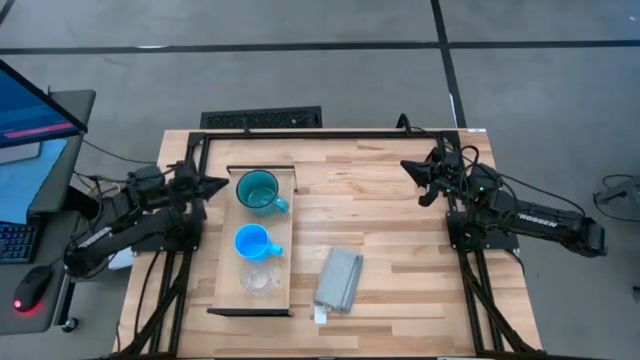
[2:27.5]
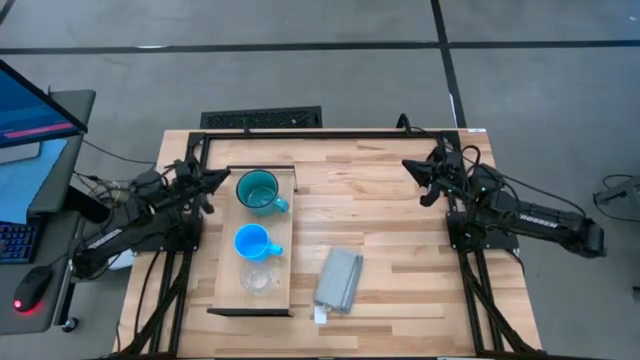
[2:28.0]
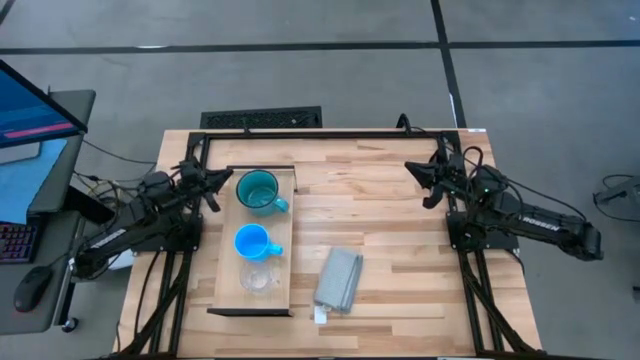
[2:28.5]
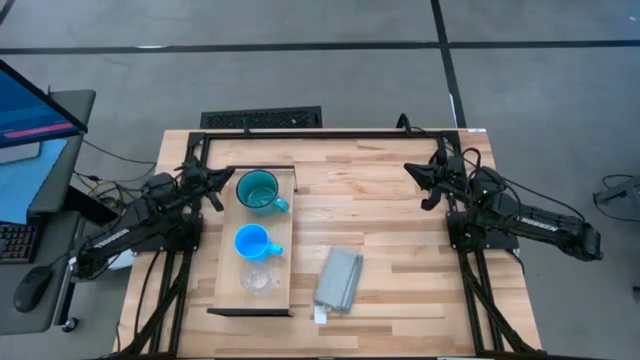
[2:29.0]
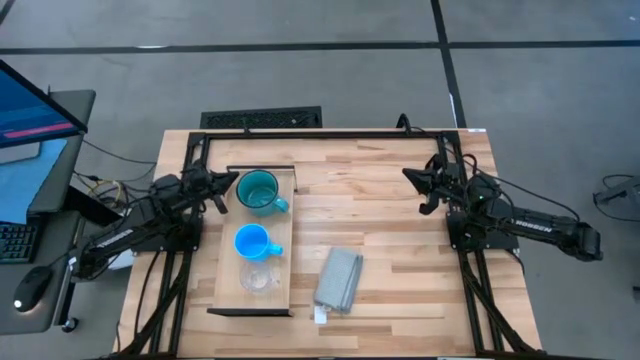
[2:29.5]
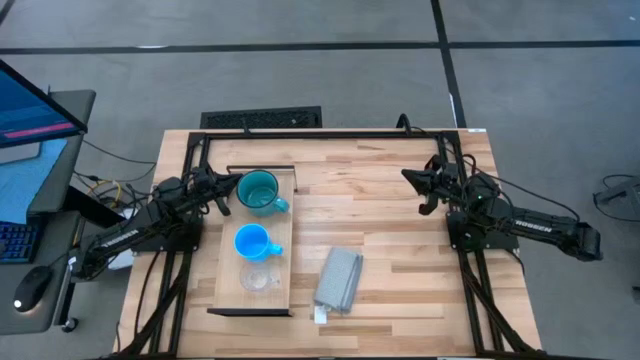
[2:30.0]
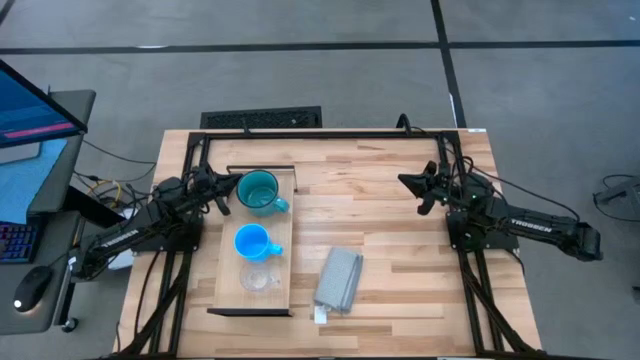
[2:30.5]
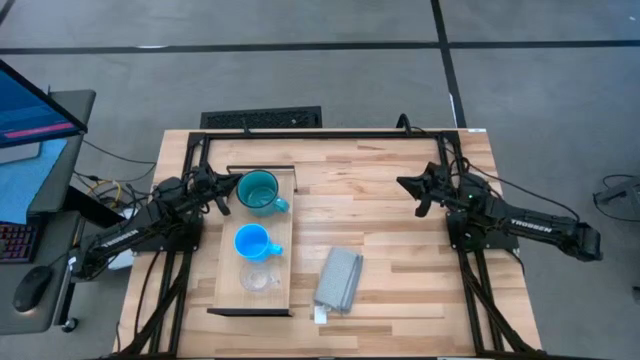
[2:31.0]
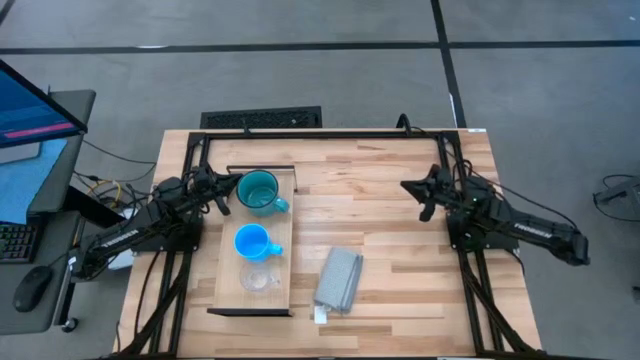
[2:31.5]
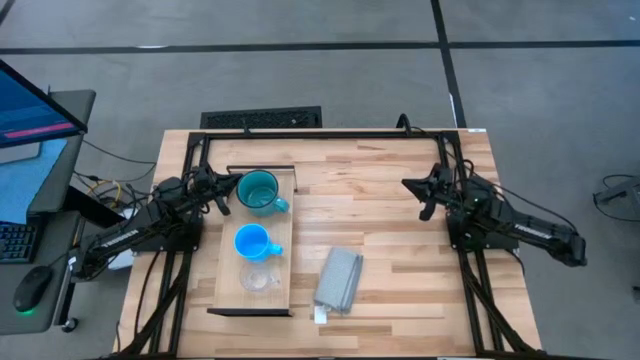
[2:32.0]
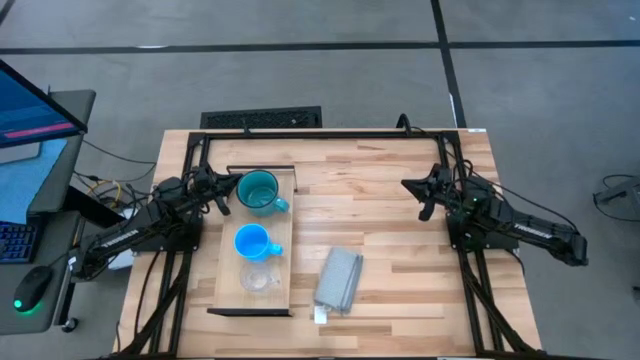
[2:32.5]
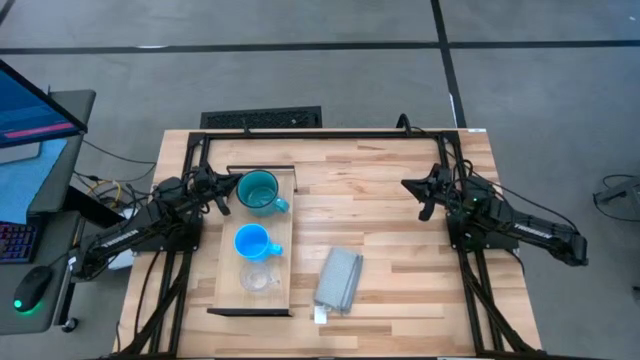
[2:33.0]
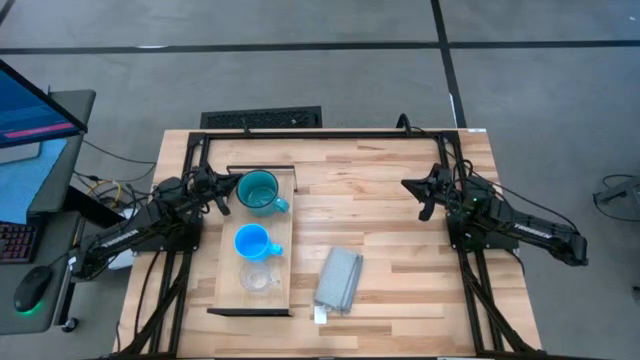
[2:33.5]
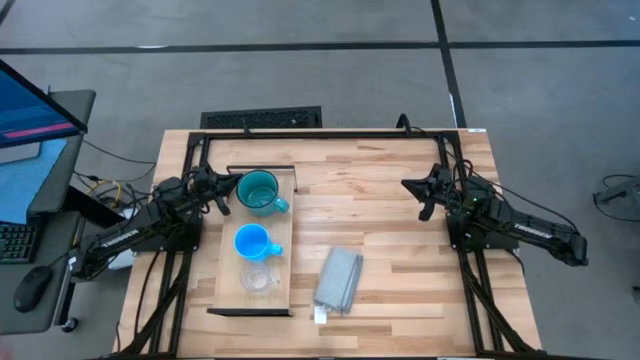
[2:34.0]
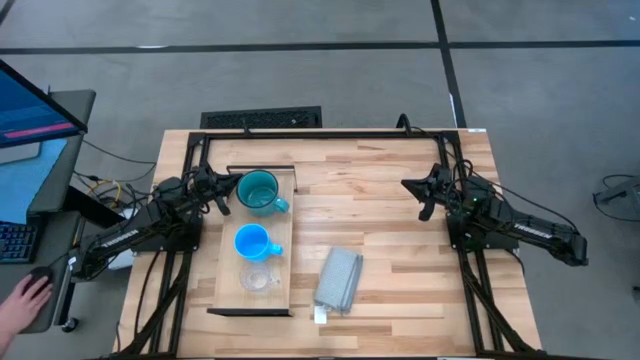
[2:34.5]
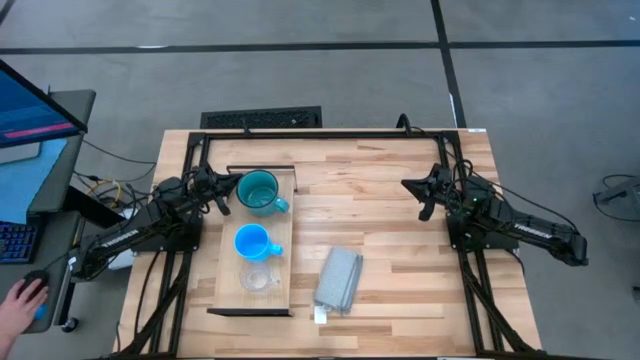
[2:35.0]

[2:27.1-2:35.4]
Task: Stack small to large cups/mugs on shelf
Return to Home Position
